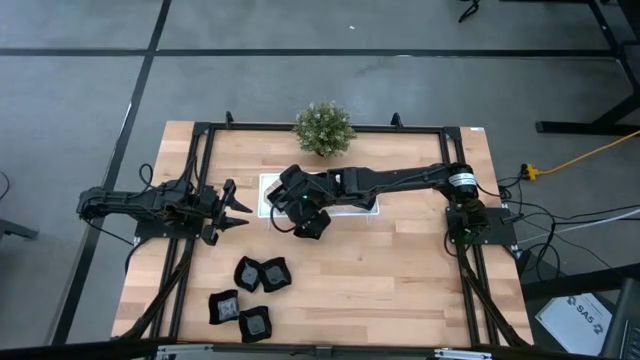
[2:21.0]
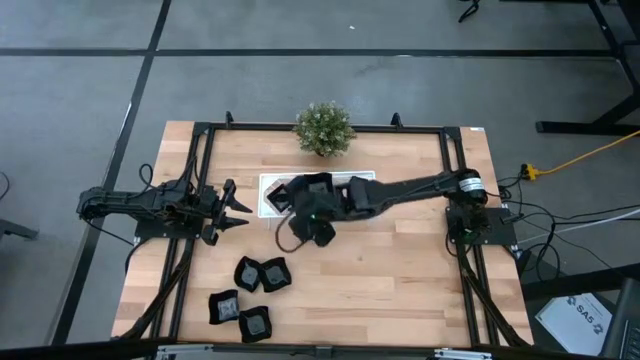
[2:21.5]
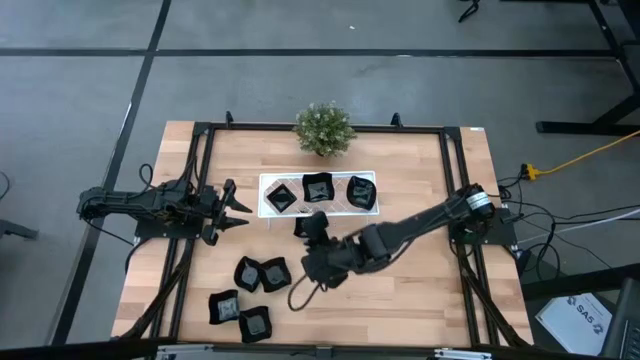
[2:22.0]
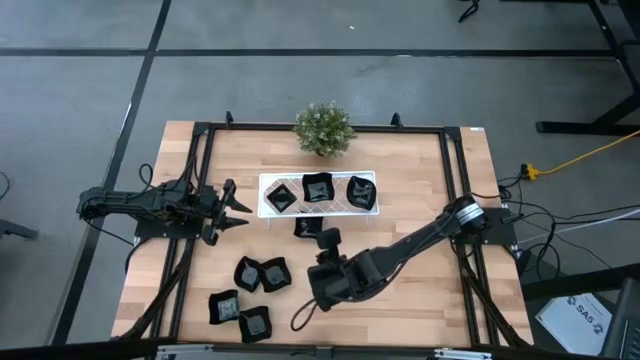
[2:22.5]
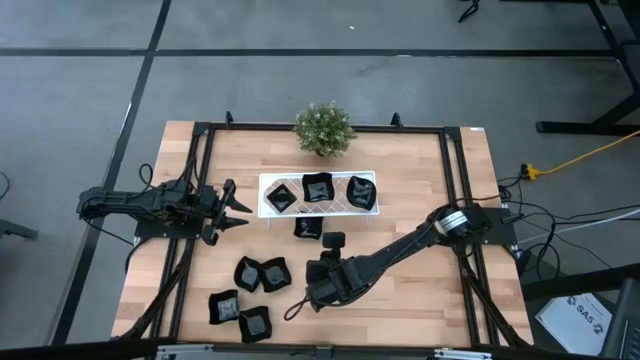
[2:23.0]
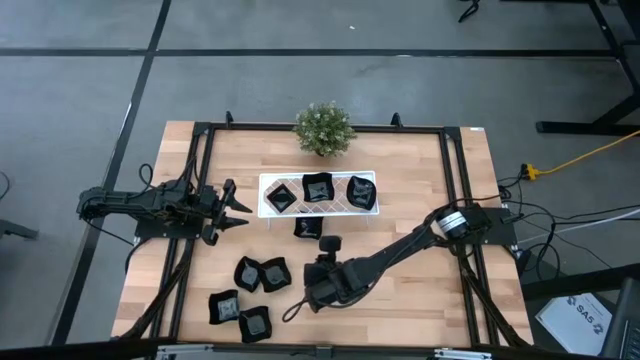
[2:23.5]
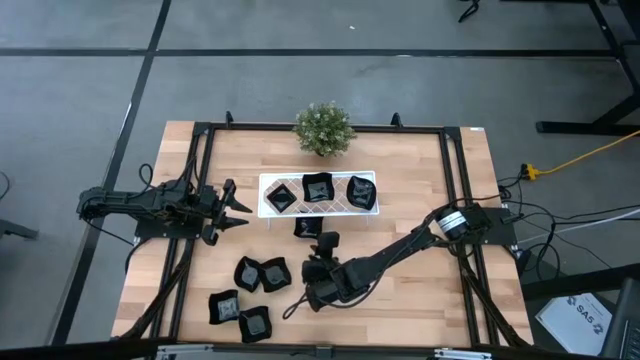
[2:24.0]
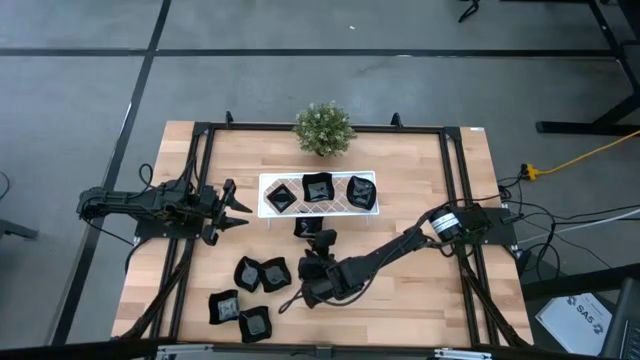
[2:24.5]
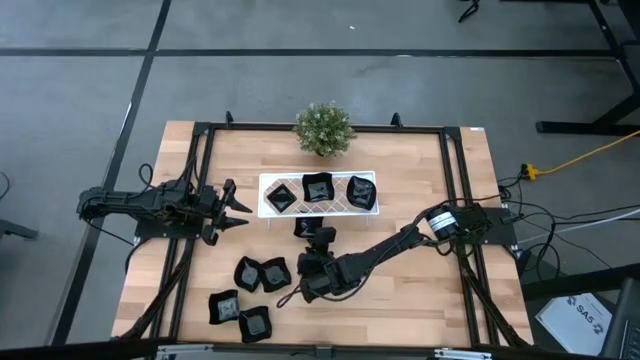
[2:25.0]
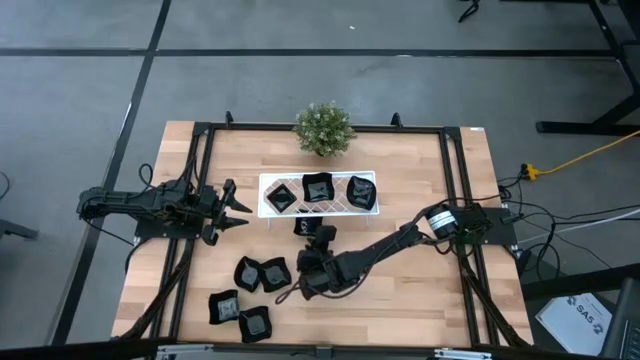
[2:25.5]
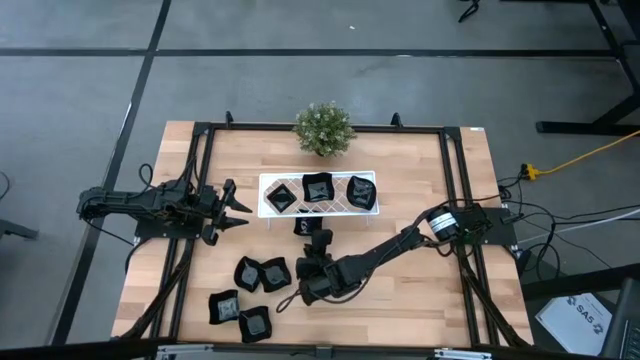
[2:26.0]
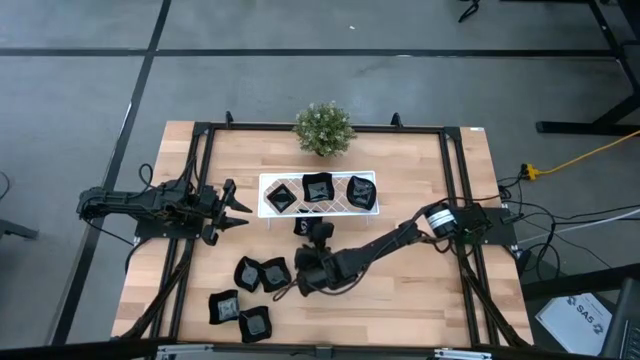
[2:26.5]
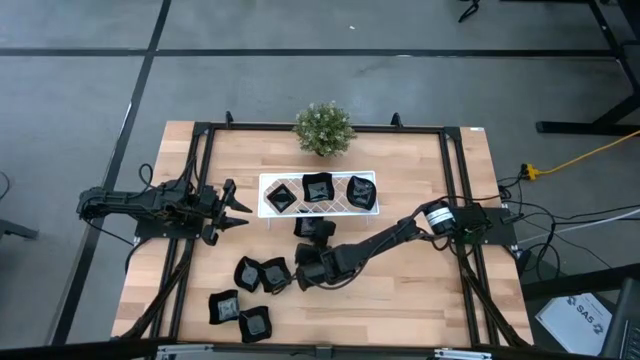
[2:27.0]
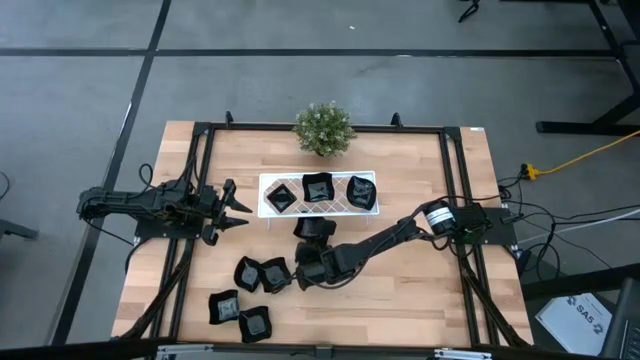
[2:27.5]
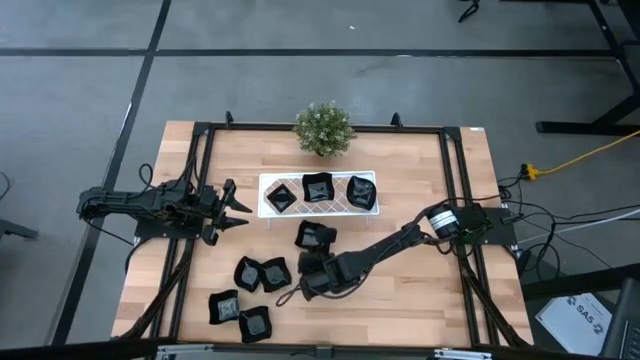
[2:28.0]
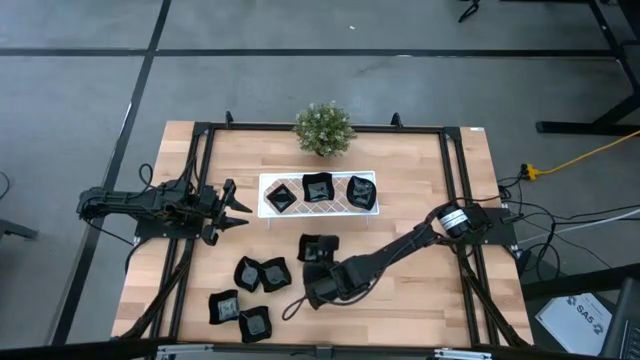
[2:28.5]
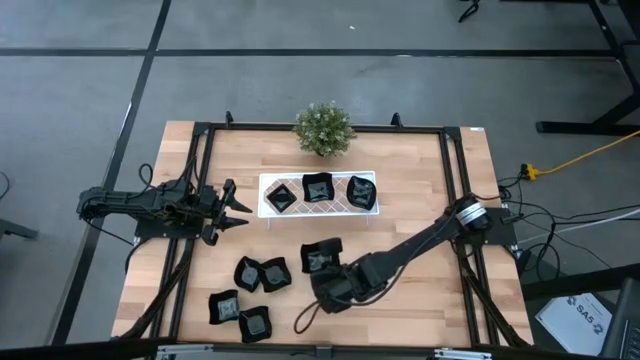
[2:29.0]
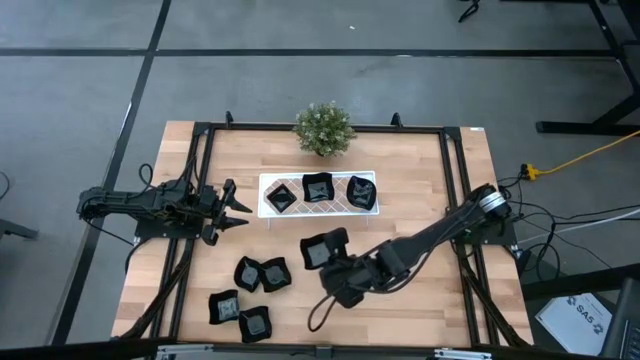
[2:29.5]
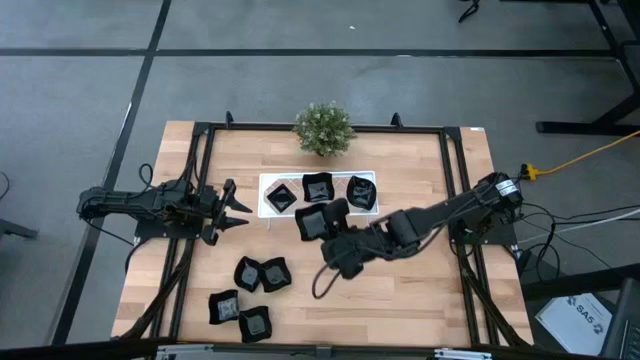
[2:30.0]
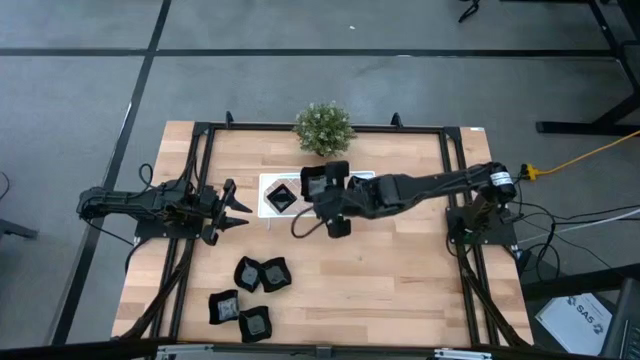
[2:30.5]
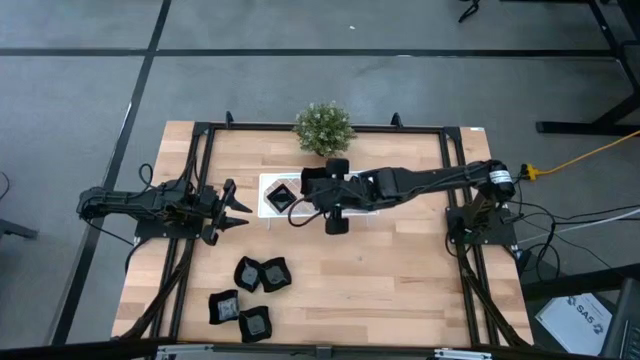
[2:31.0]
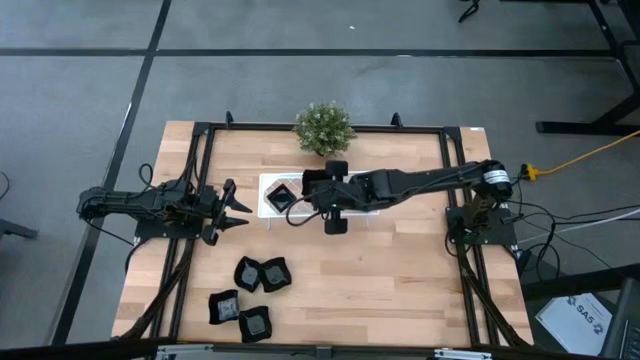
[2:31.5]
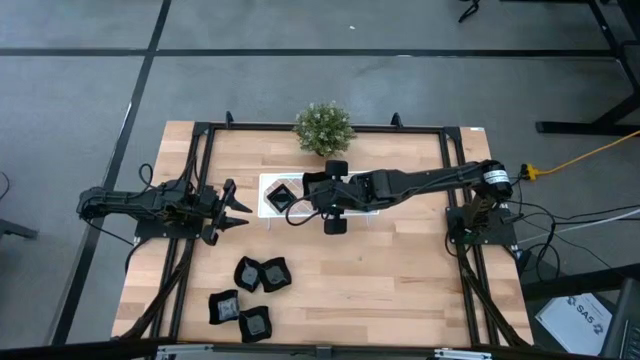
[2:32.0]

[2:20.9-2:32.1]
Task: Pick & Place Mini shaped plates
Stack the black distorted square plate on top of the black distorted square plate on the shelf

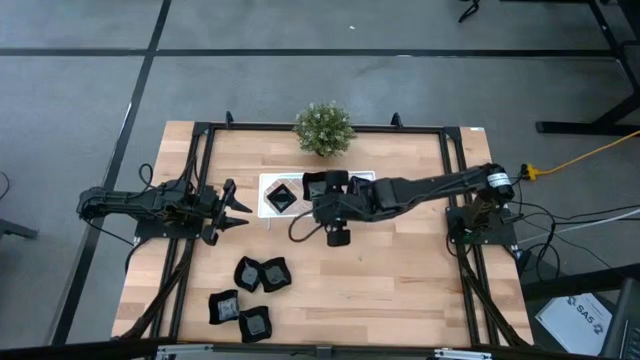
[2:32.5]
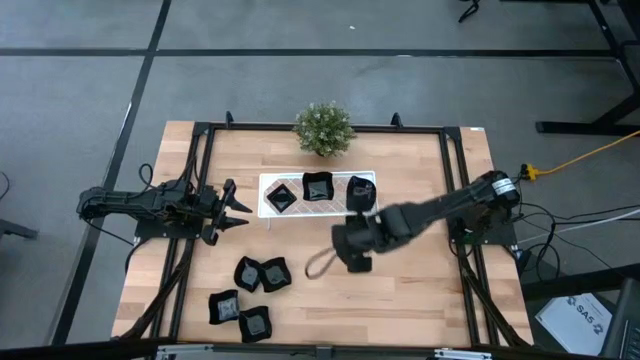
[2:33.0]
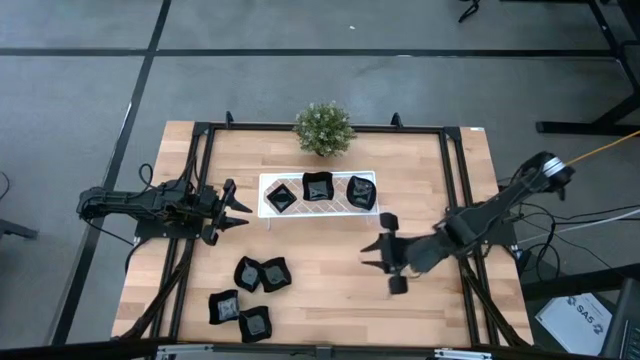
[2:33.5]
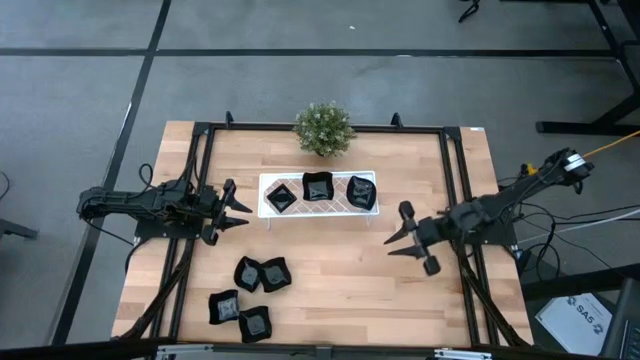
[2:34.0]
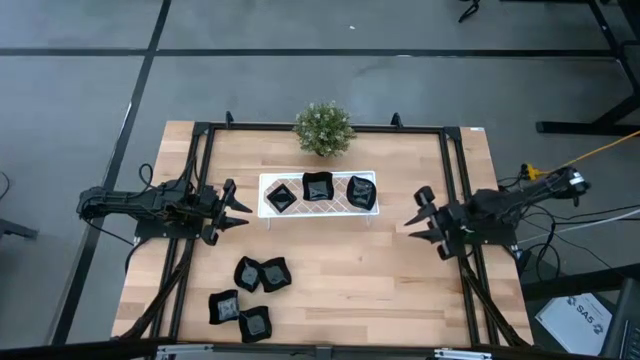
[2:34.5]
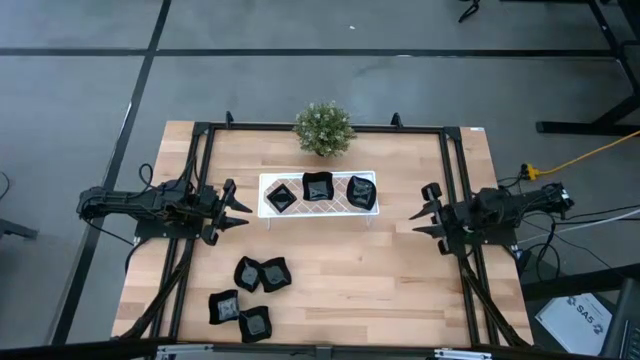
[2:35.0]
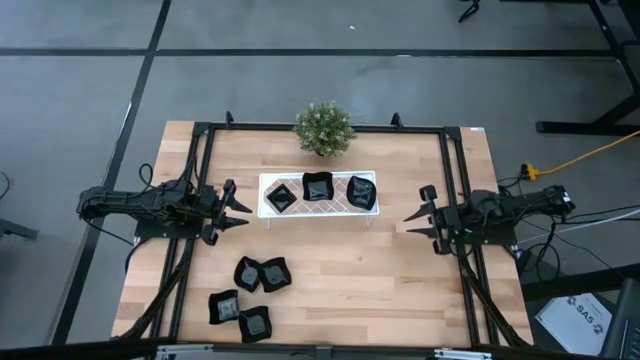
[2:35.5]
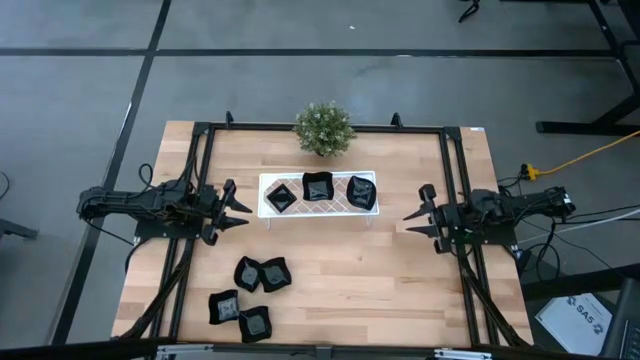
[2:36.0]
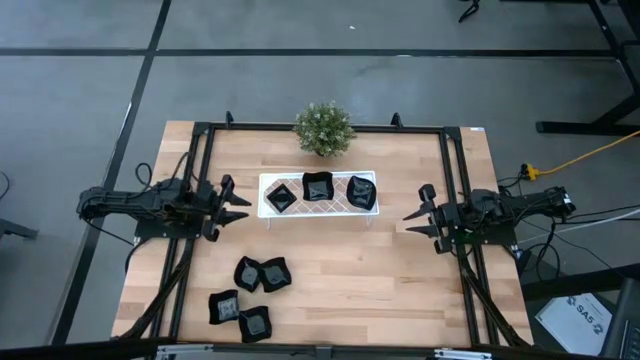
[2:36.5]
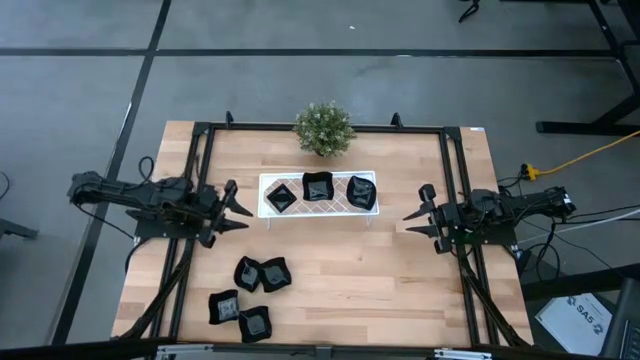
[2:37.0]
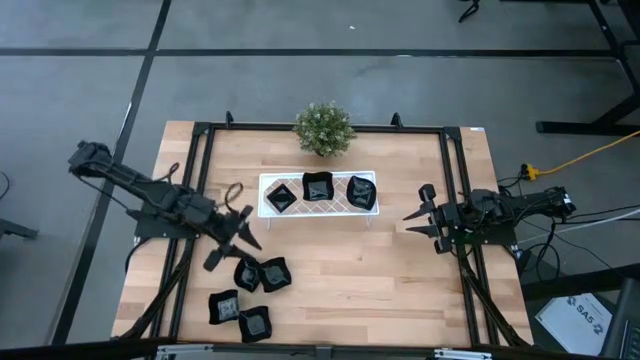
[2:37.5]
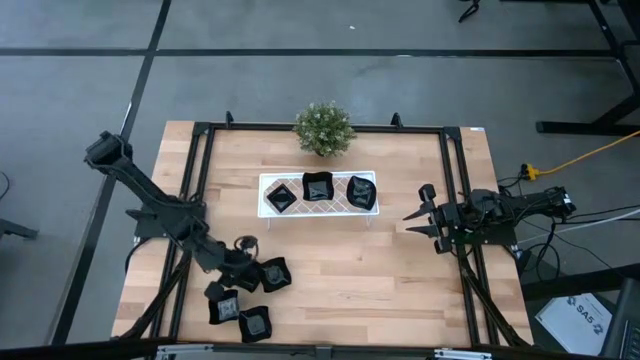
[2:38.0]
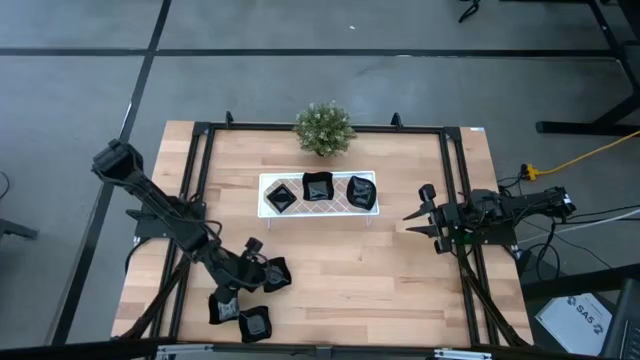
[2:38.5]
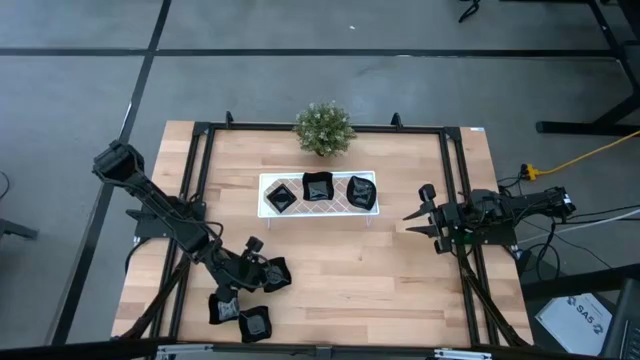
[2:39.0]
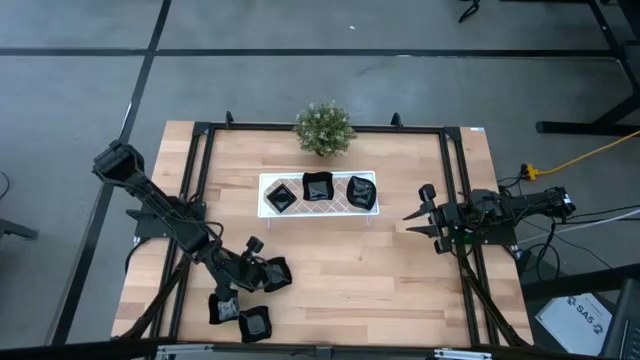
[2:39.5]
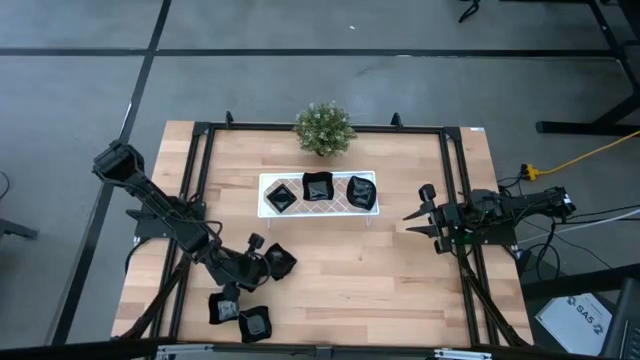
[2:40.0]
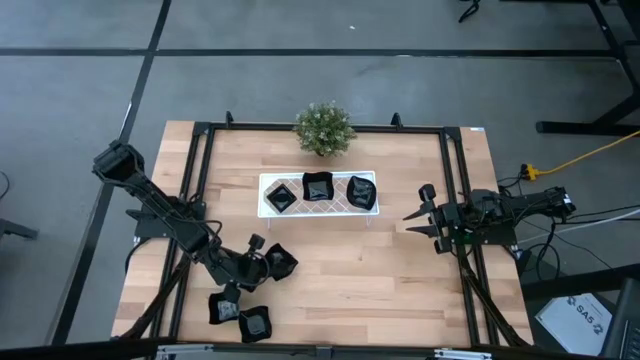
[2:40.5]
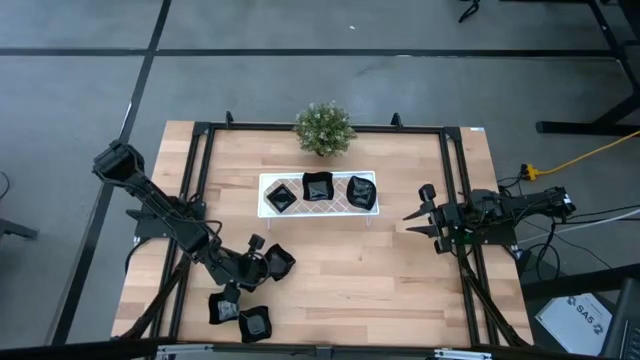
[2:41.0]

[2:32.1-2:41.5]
Stack the black leaf-shaped plate on top of the black leaf-shaped plate on the shelf

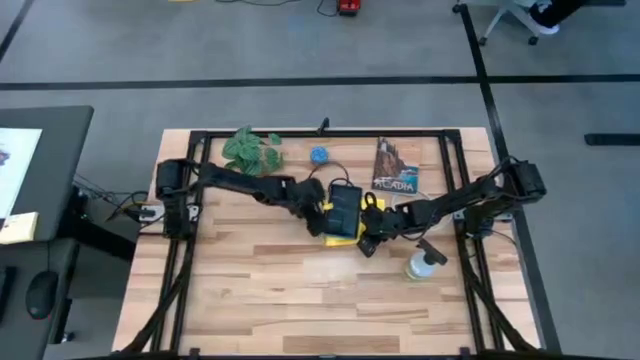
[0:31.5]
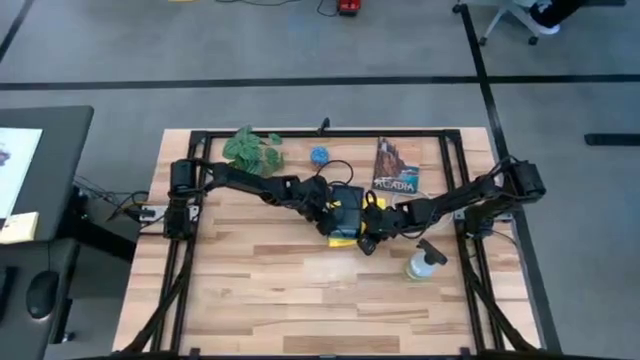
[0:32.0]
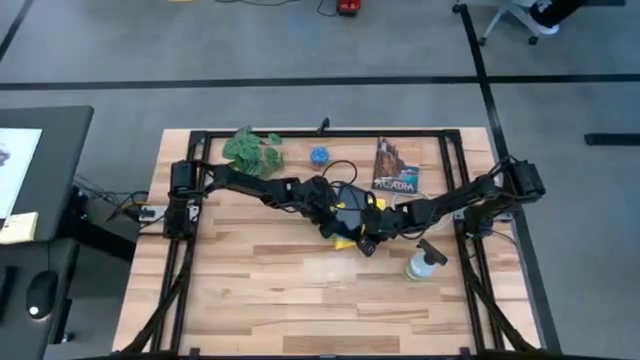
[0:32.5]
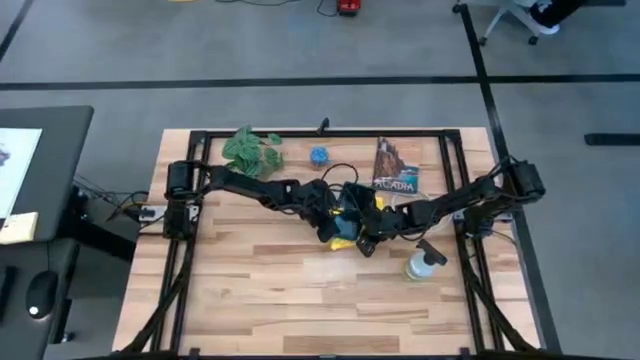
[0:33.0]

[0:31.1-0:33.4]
Task: Apply microfiber cloth
Prepare the blue tablet
